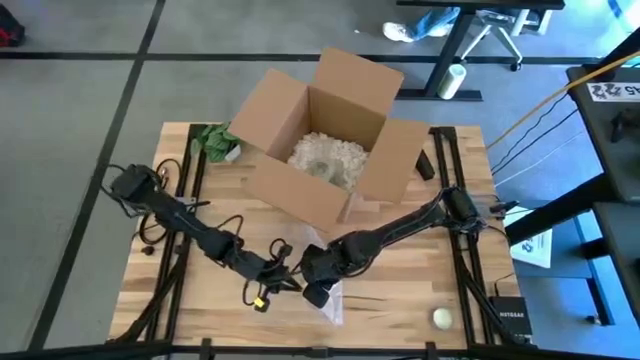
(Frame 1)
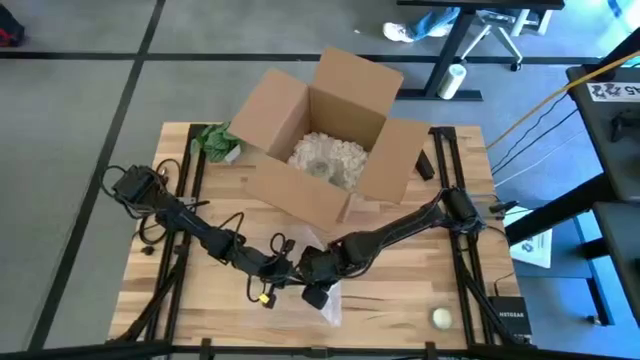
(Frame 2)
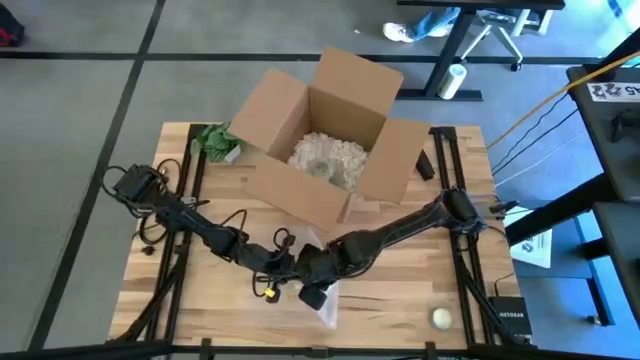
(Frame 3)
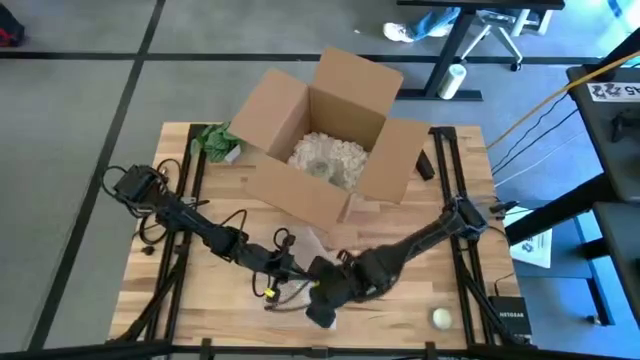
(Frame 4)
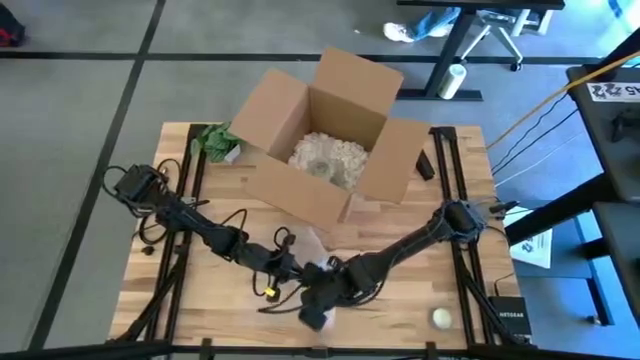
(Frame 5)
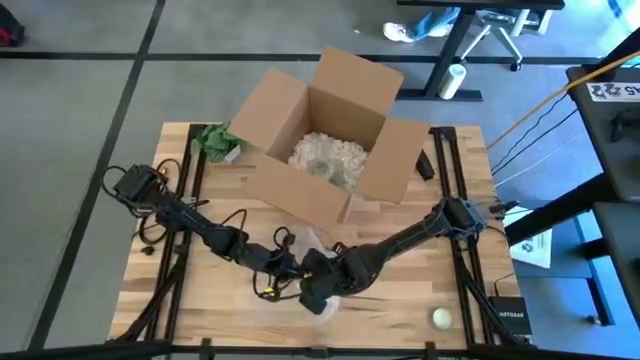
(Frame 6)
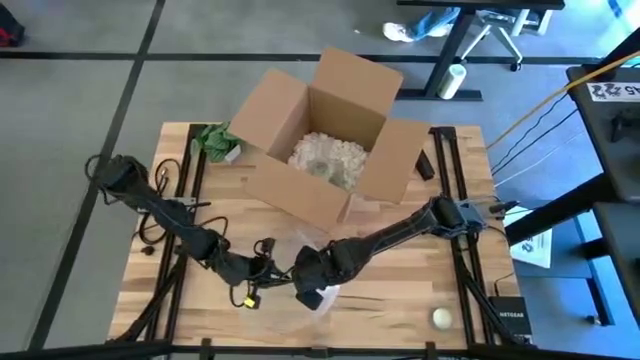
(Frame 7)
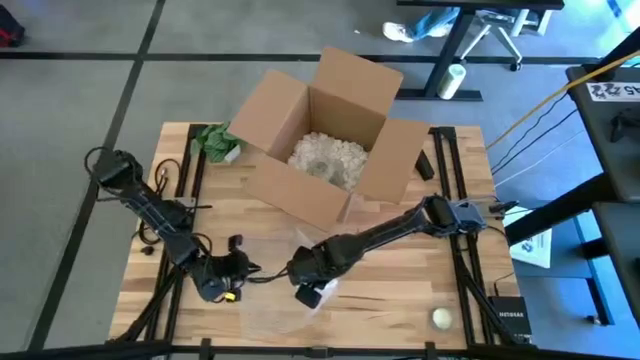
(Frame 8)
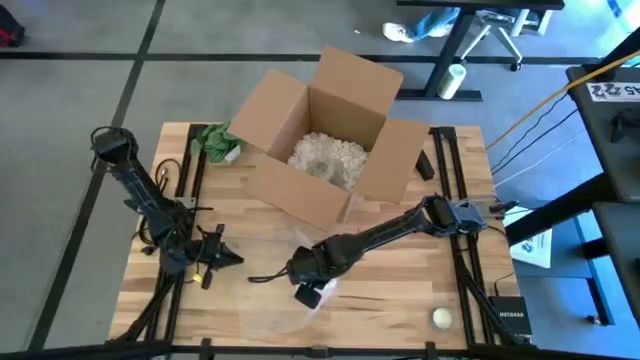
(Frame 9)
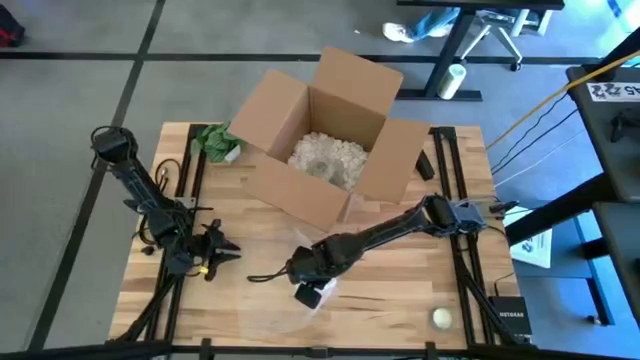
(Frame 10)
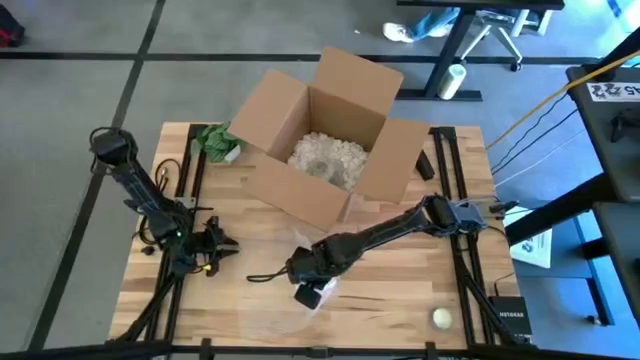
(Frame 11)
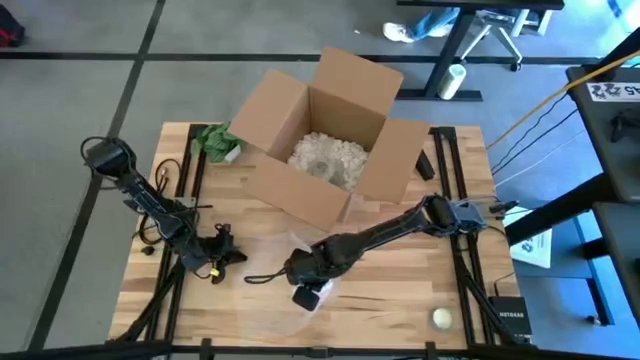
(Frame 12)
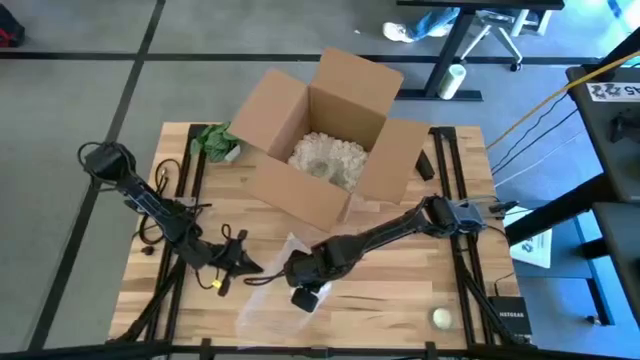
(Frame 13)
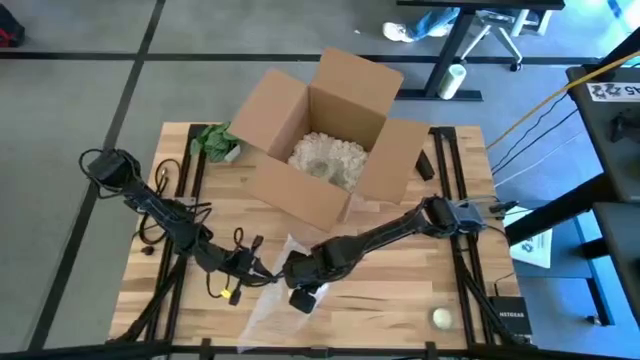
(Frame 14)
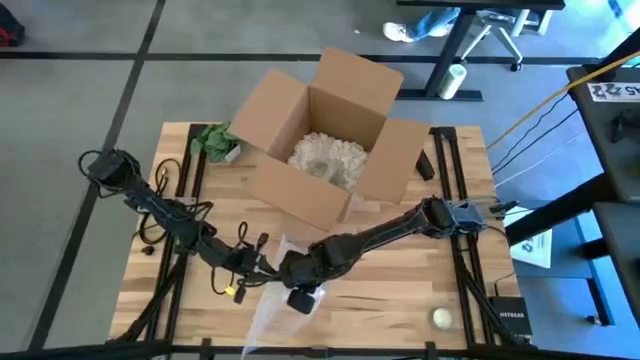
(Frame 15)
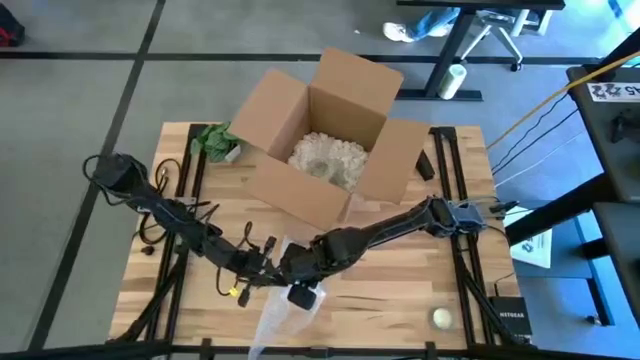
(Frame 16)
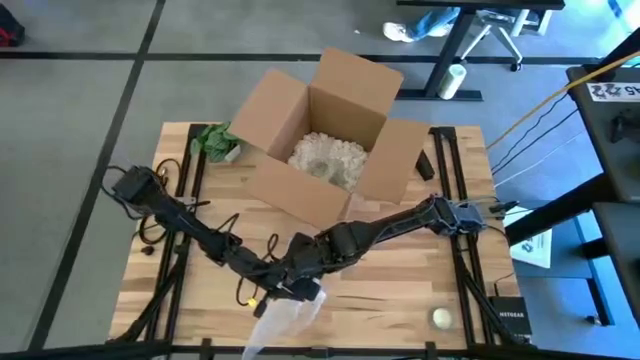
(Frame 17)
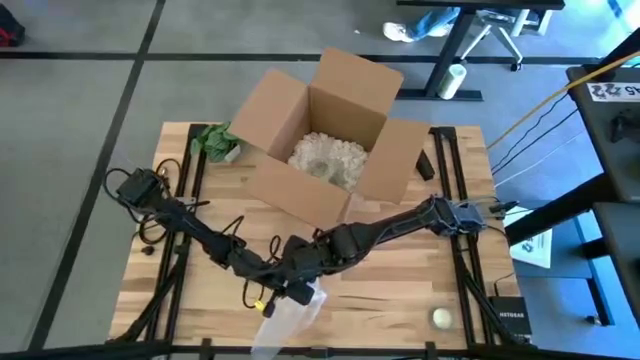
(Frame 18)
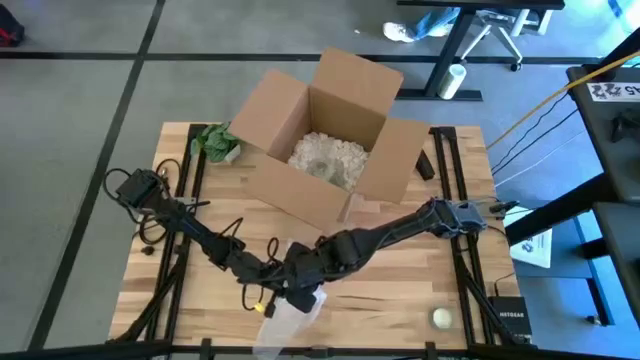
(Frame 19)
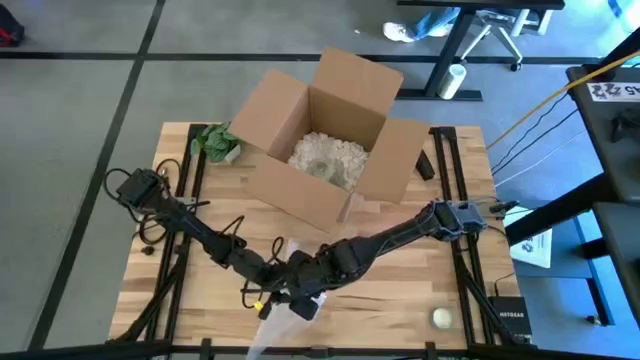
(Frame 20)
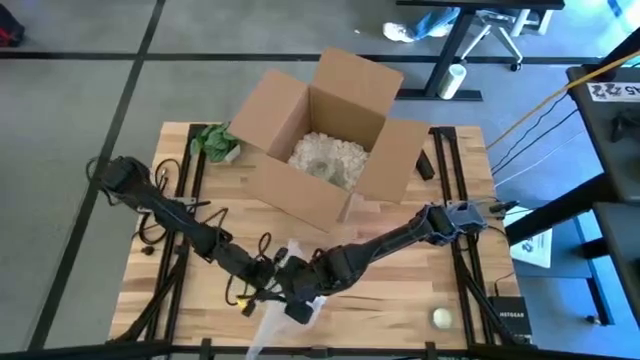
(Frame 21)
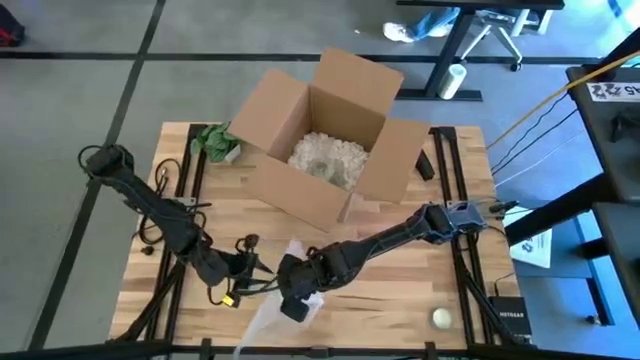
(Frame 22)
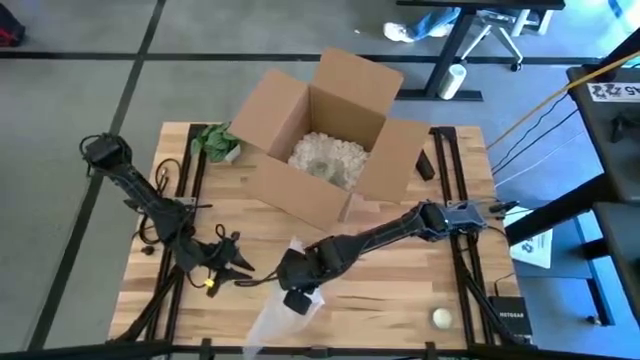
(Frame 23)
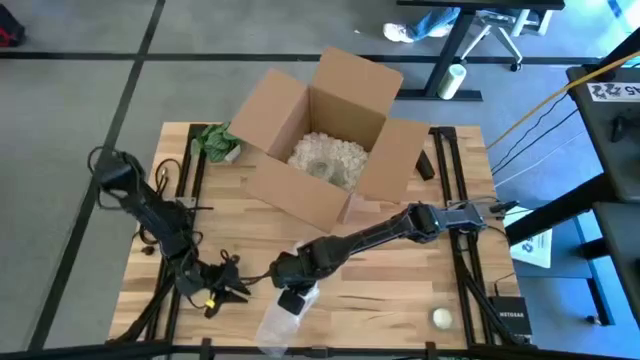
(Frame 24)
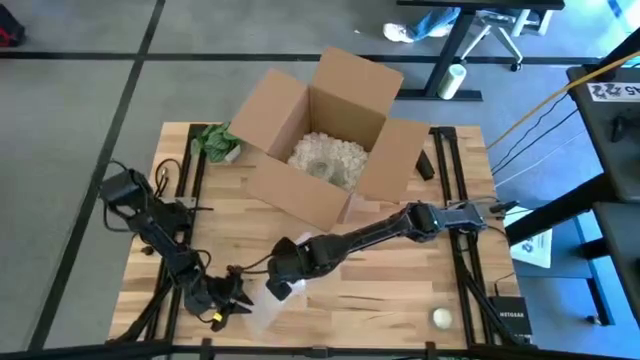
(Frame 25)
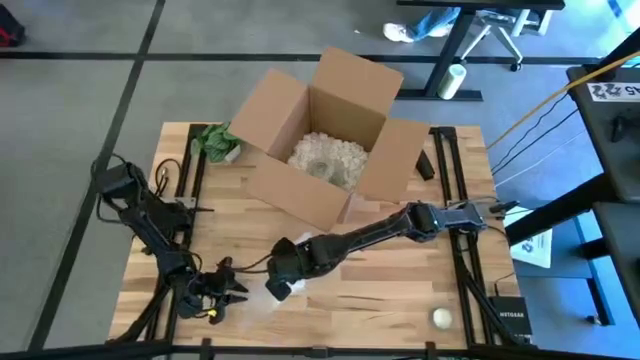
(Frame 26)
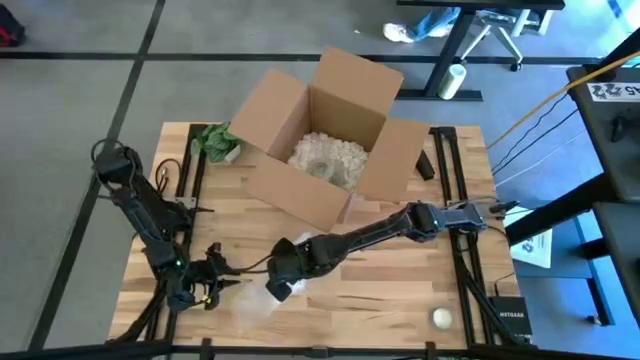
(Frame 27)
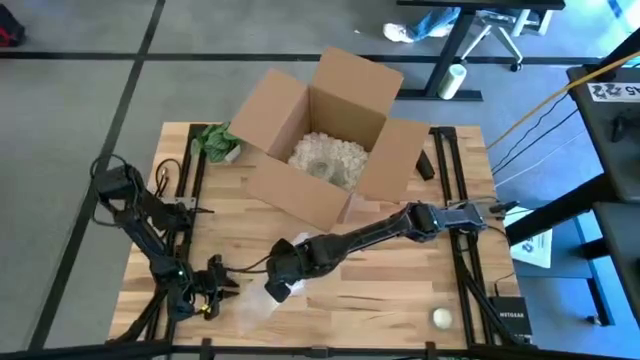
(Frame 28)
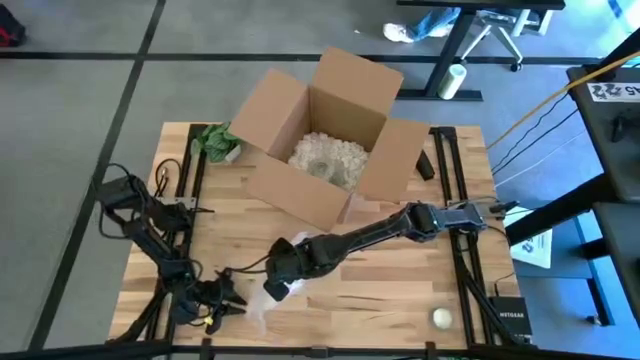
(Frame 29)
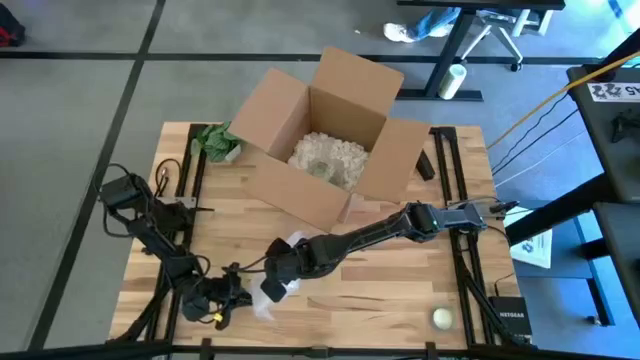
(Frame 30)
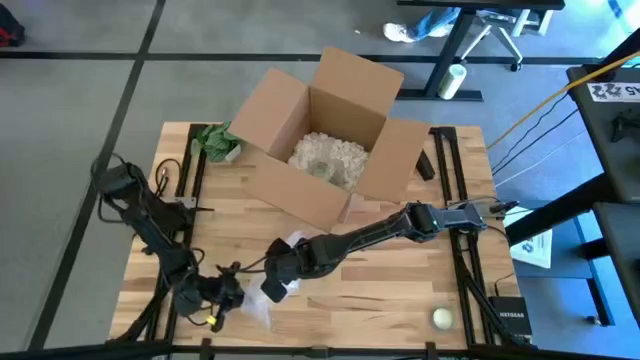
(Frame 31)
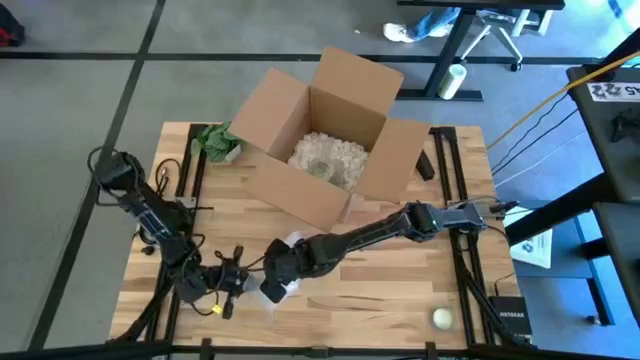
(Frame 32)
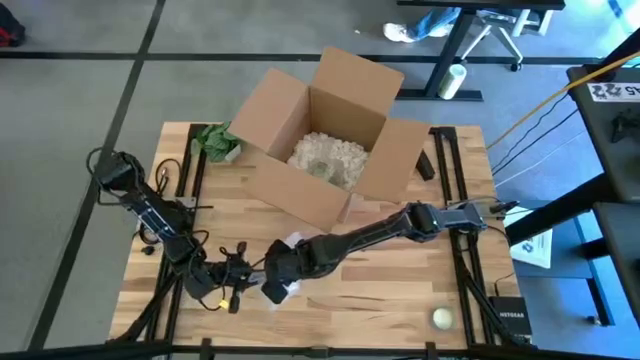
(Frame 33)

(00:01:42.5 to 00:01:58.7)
Task: wrap mug
Wrap the blue mug with the bubble wrap
